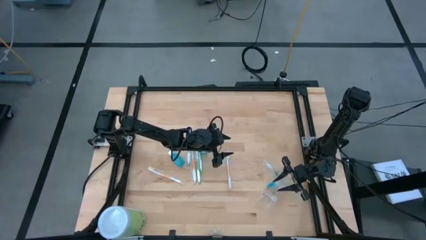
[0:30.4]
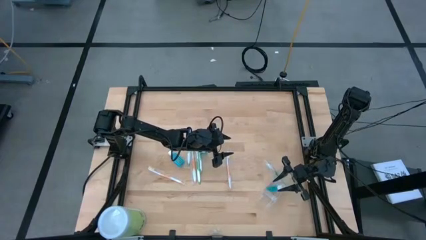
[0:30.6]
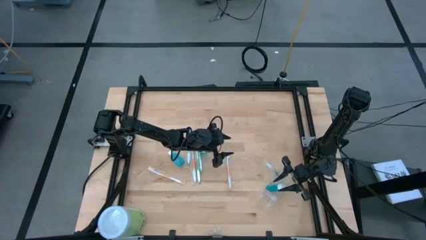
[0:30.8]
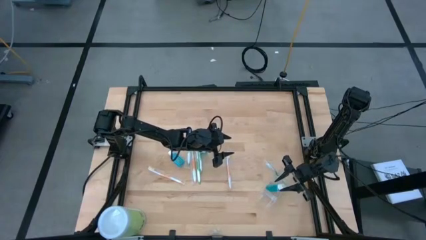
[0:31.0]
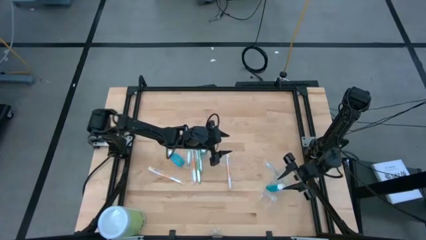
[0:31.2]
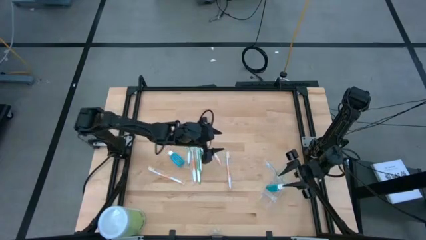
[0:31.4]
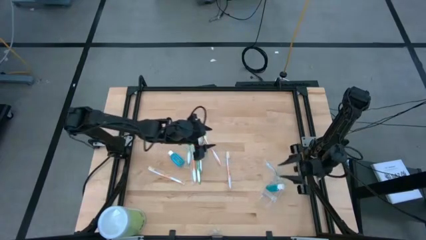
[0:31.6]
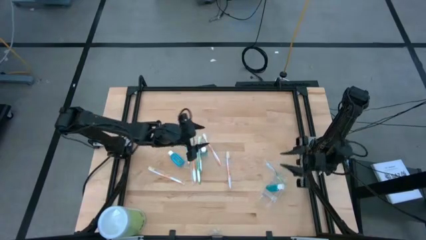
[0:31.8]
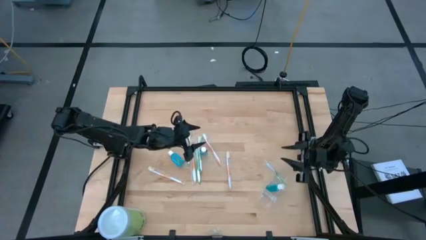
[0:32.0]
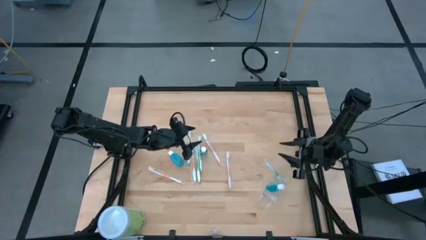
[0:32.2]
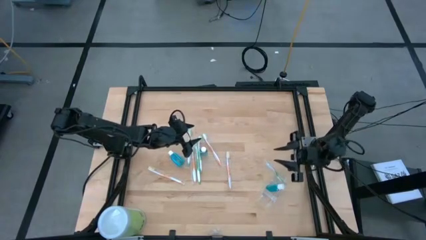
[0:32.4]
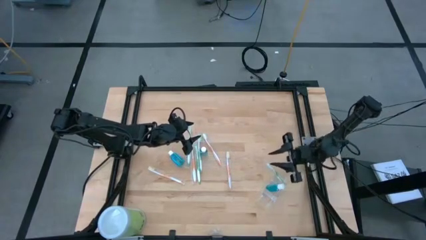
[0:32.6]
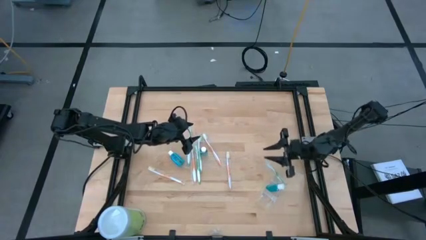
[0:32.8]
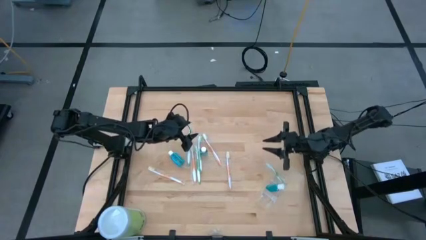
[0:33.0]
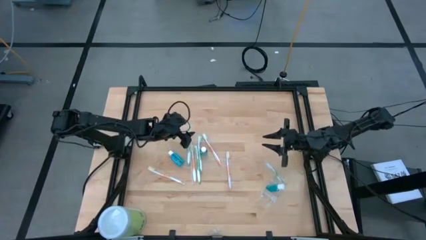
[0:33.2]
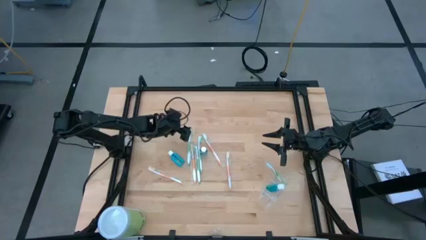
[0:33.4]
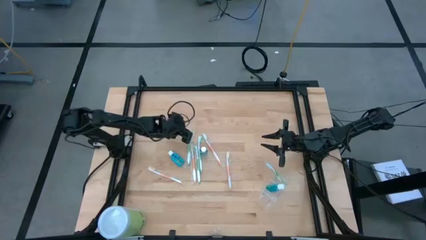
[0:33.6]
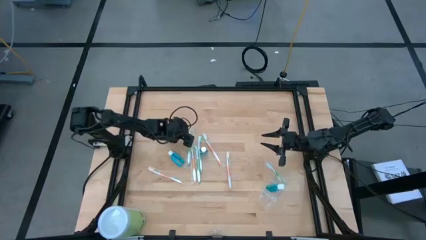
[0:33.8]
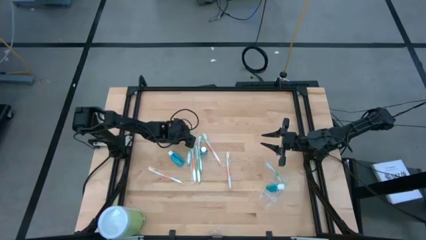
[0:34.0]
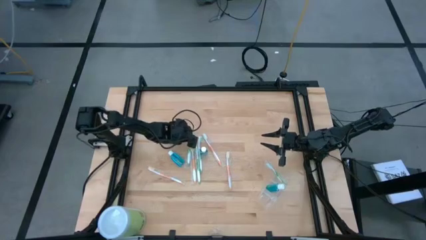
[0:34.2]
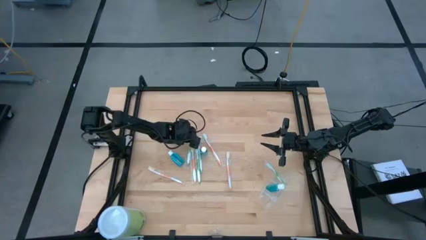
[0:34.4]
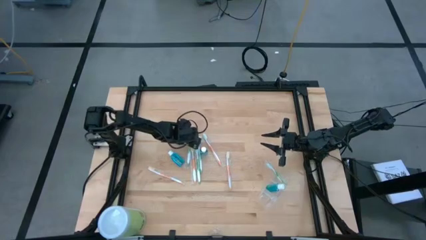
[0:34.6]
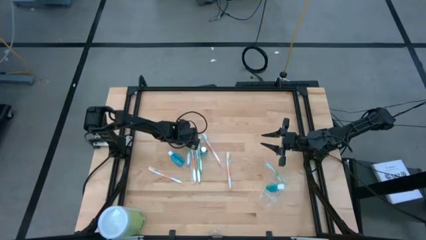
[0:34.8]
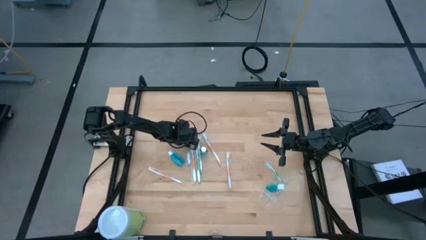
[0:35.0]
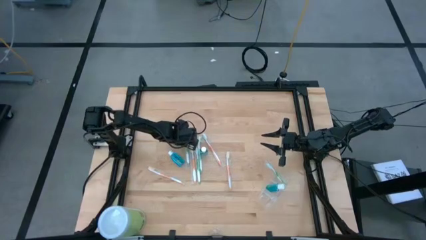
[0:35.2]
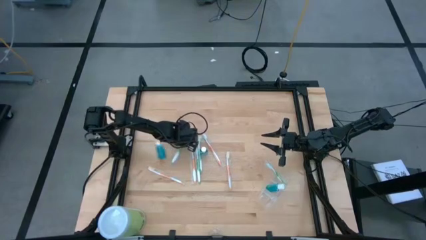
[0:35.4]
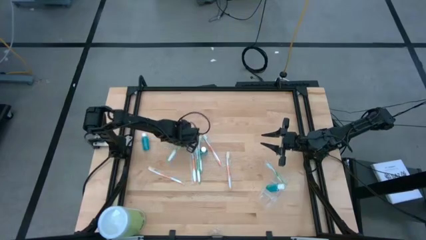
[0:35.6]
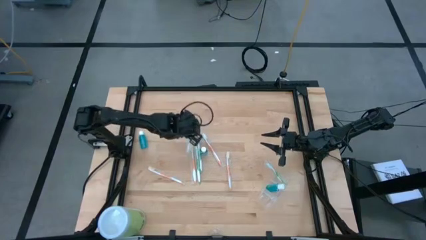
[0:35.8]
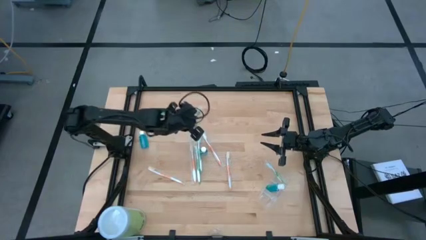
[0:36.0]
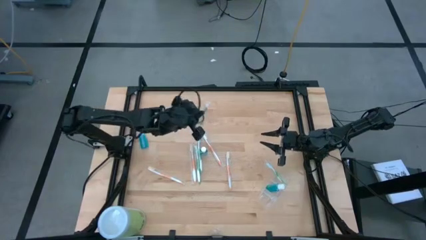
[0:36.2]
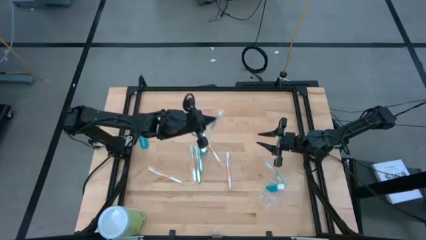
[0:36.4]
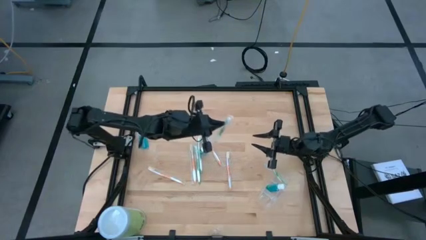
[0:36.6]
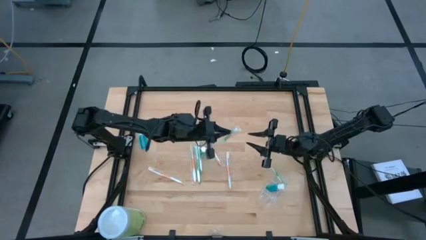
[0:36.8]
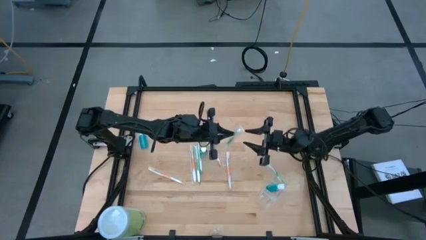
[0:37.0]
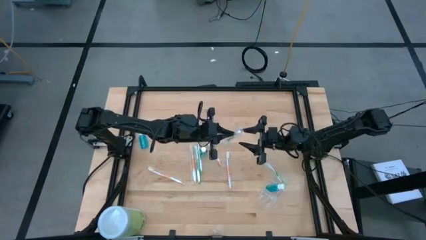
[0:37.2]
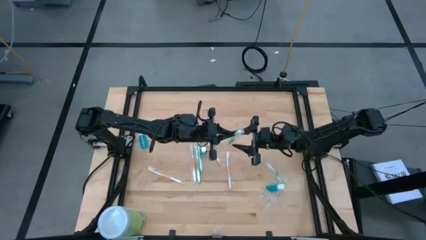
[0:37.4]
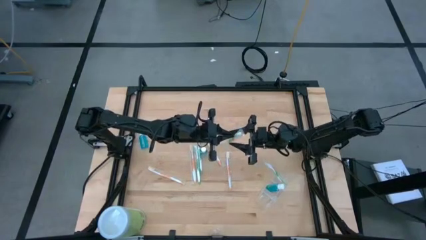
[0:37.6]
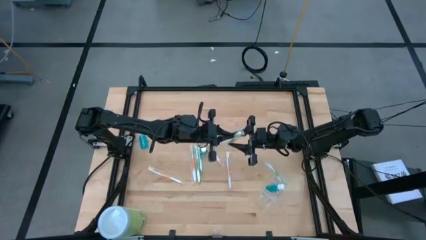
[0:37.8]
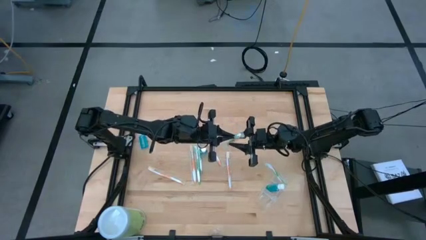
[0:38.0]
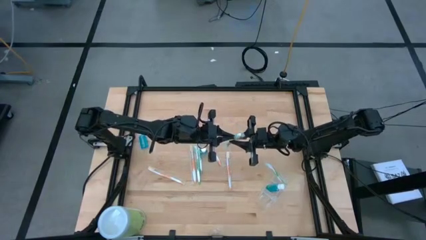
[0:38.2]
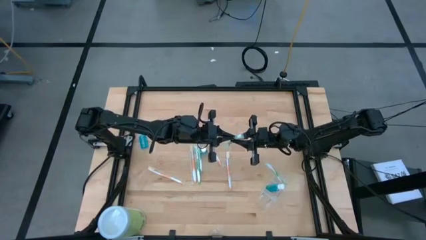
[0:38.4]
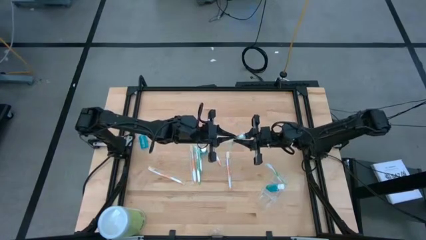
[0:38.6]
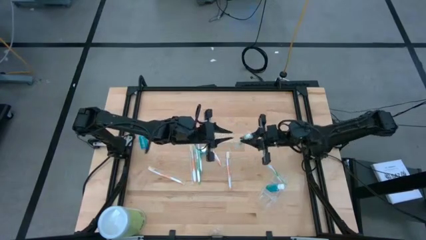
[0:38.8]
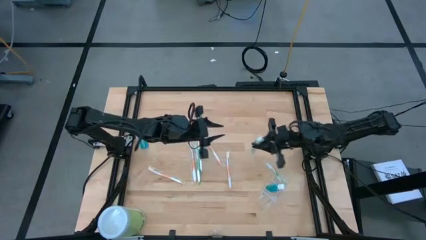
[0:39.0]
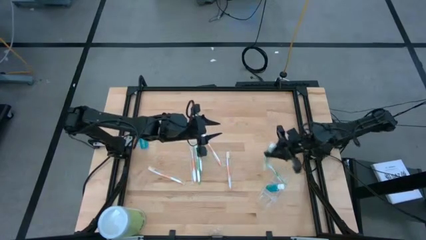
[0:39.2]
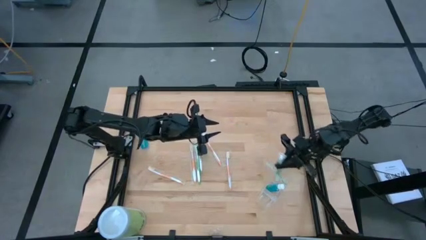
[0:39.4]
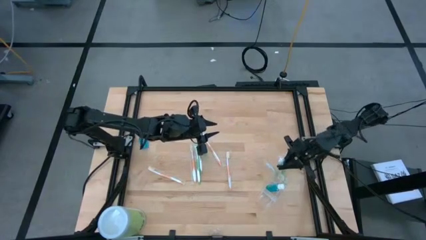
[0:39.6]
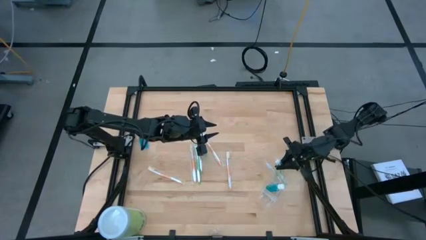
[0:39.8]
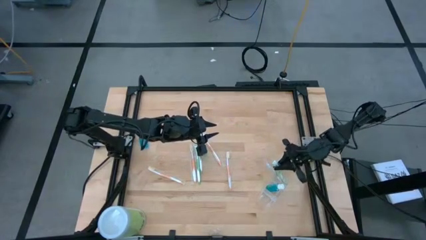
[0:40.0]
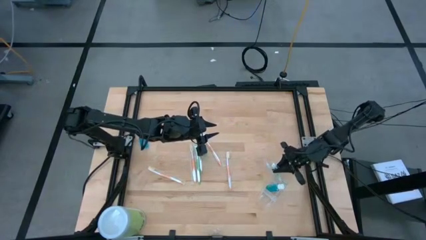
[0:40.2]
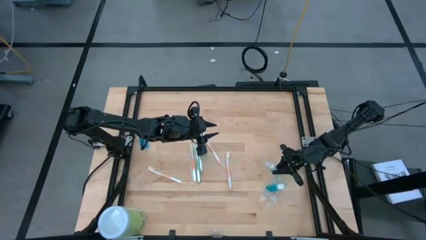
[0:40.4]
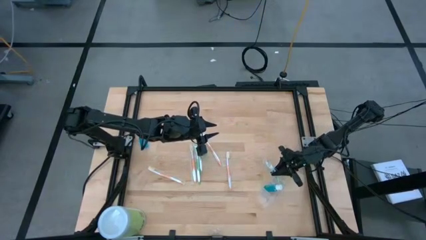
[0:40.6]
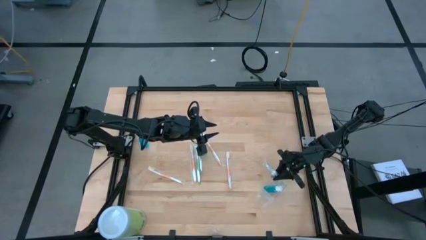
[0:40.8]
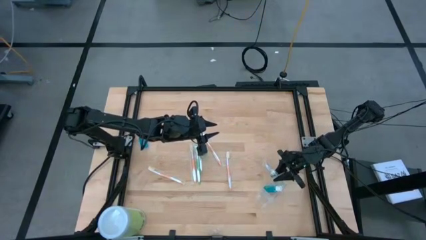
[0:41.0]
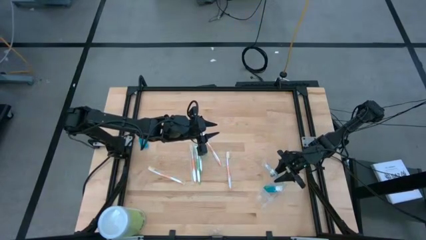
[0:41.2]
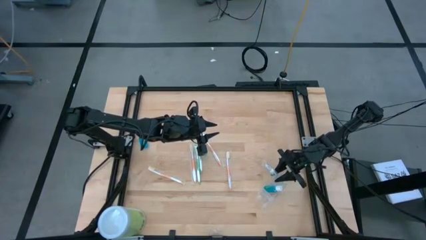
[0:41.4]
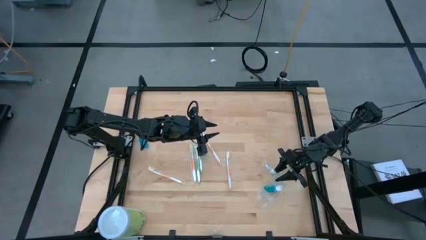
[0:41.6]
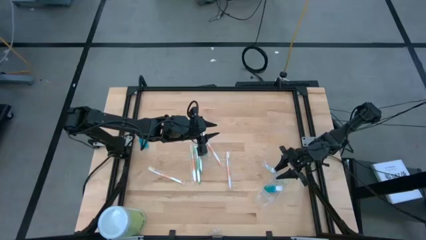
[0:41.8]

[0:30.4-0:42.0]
Task: Pick & Place toothbrushing station
Put the green toothbrush into the top section of the transparent organizer
